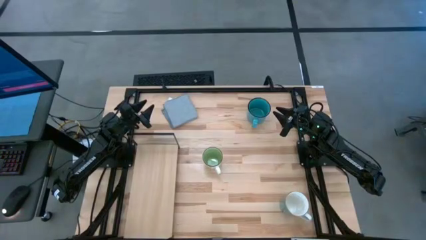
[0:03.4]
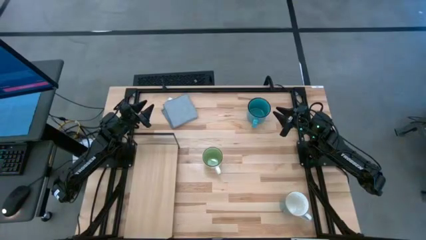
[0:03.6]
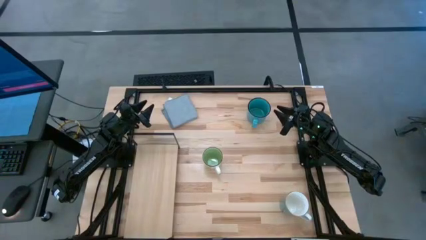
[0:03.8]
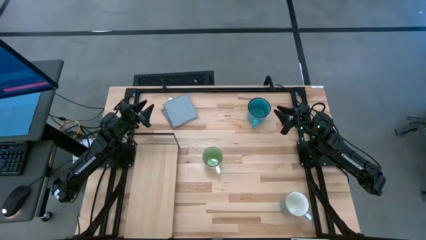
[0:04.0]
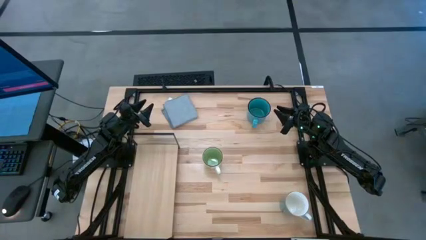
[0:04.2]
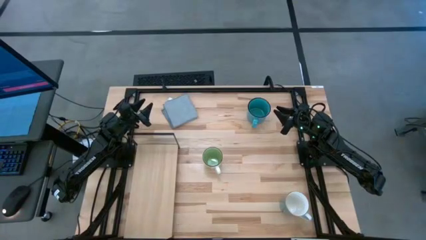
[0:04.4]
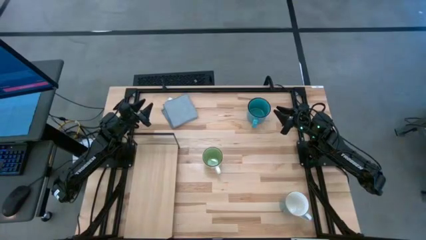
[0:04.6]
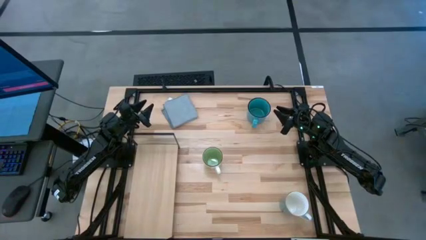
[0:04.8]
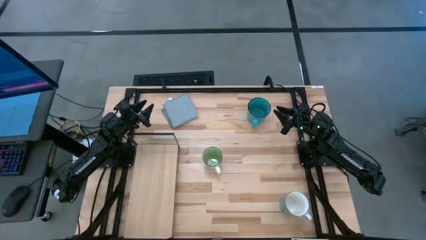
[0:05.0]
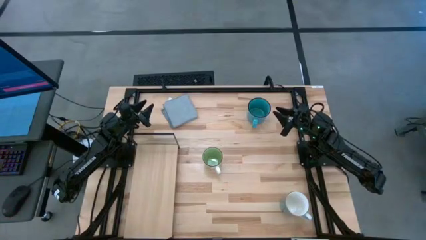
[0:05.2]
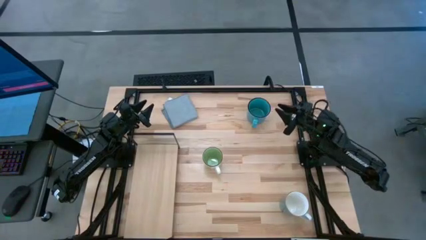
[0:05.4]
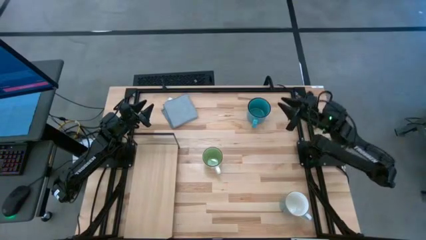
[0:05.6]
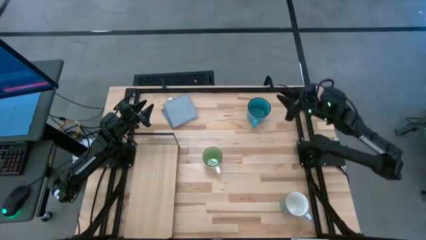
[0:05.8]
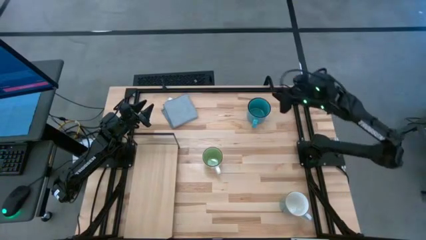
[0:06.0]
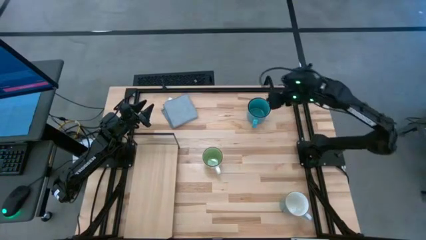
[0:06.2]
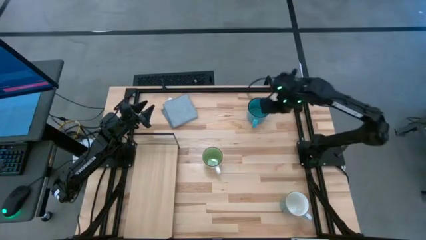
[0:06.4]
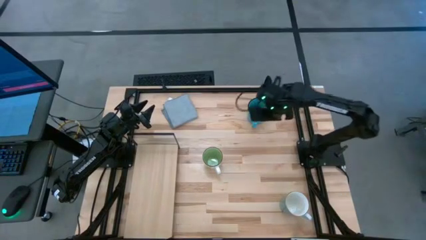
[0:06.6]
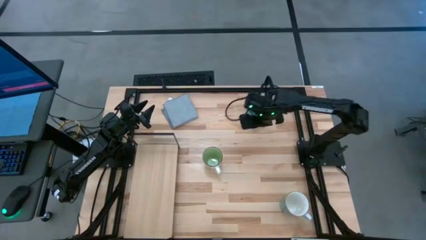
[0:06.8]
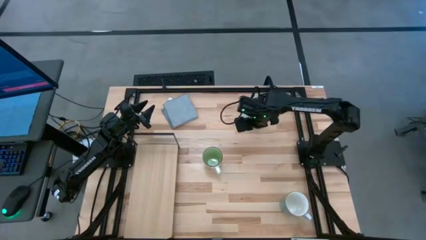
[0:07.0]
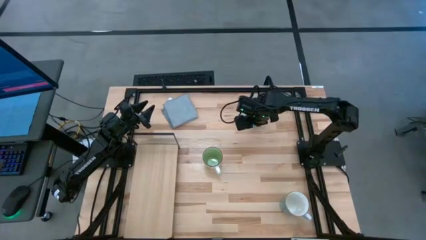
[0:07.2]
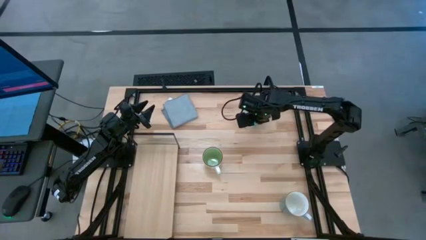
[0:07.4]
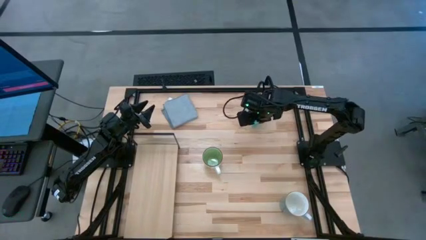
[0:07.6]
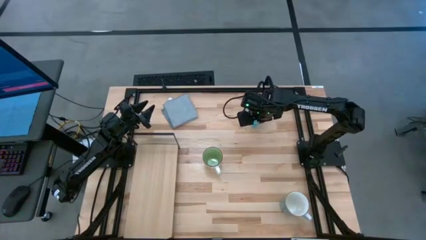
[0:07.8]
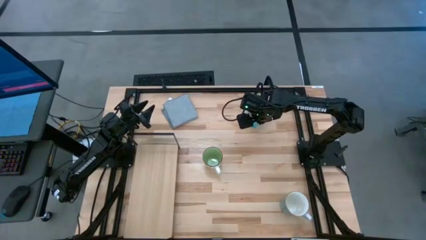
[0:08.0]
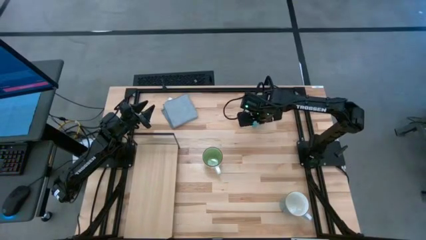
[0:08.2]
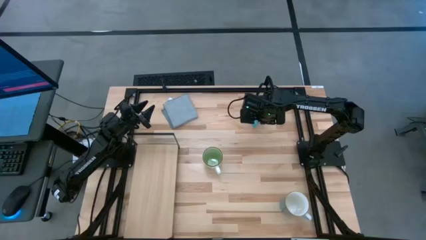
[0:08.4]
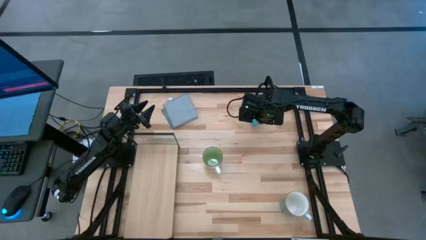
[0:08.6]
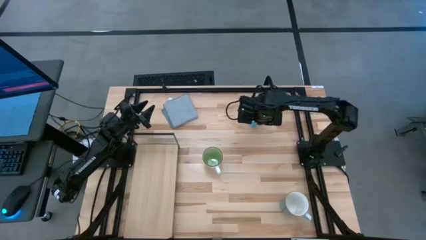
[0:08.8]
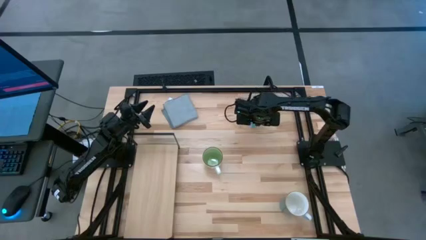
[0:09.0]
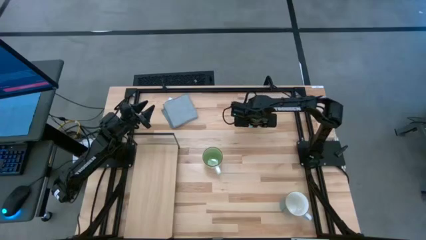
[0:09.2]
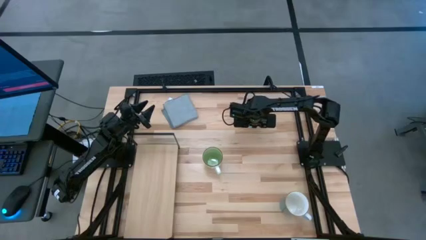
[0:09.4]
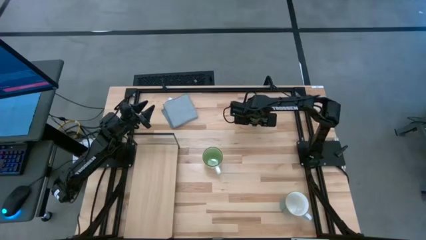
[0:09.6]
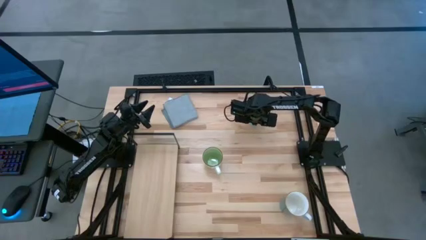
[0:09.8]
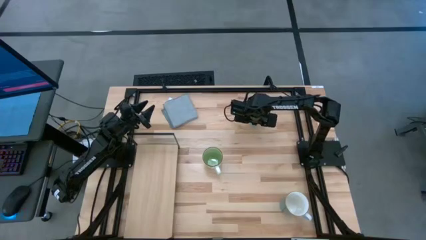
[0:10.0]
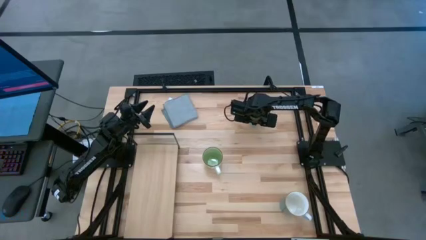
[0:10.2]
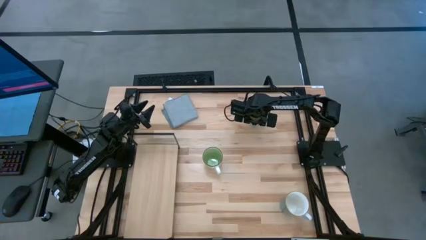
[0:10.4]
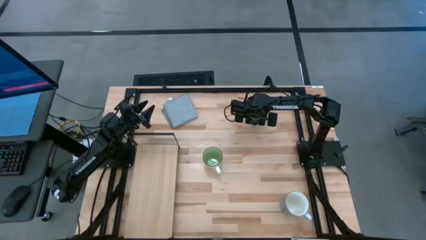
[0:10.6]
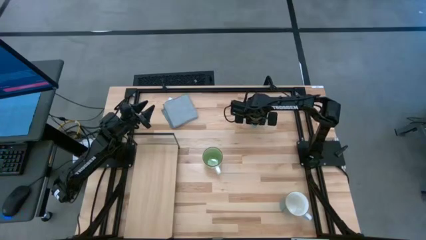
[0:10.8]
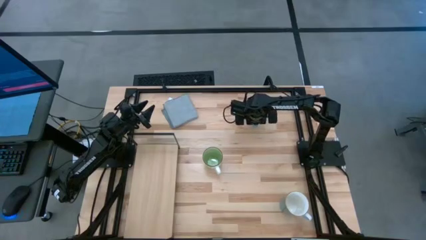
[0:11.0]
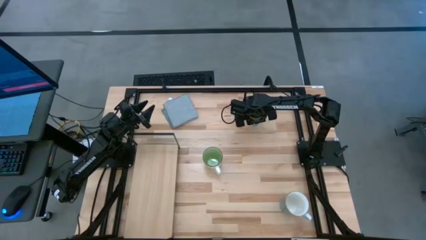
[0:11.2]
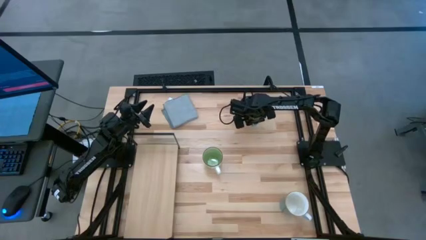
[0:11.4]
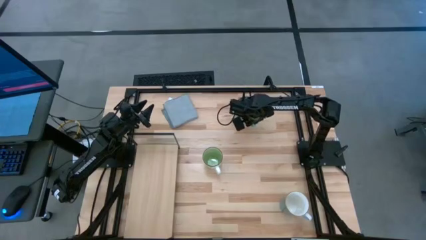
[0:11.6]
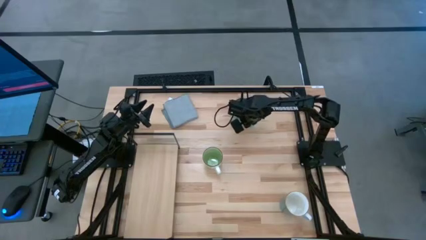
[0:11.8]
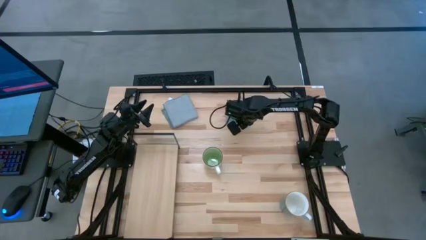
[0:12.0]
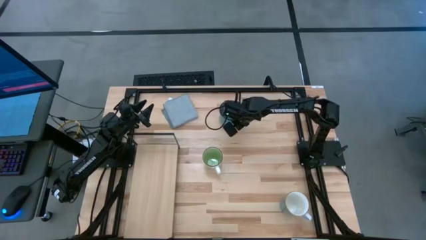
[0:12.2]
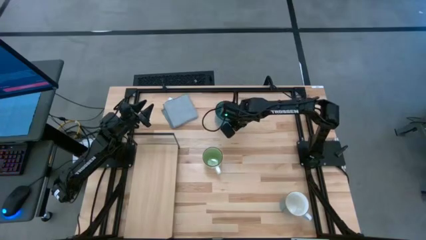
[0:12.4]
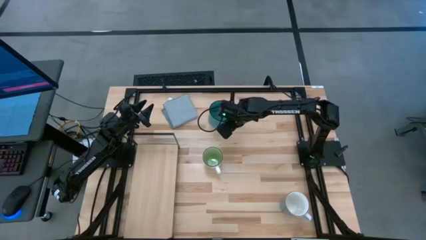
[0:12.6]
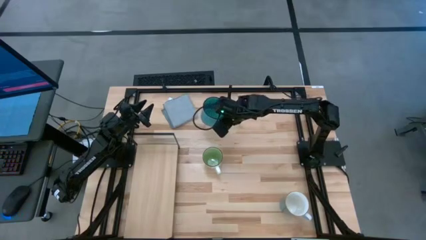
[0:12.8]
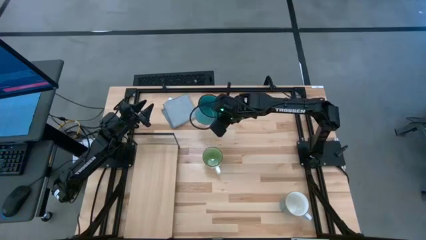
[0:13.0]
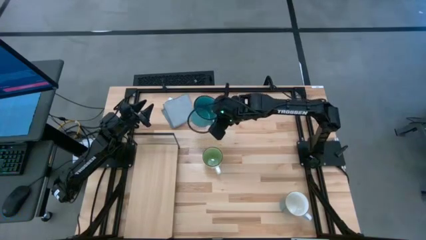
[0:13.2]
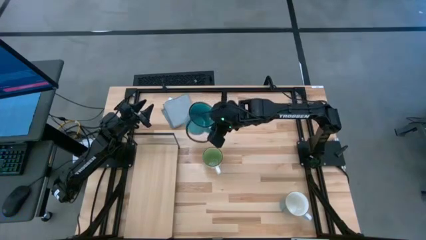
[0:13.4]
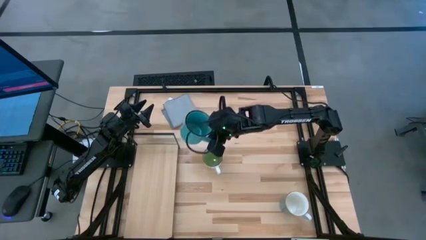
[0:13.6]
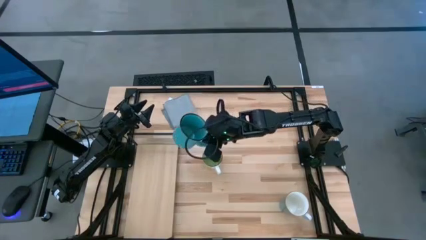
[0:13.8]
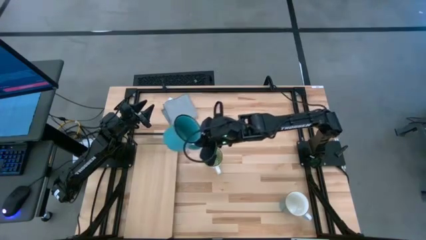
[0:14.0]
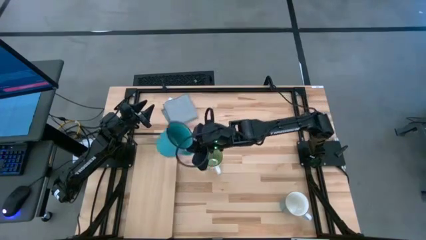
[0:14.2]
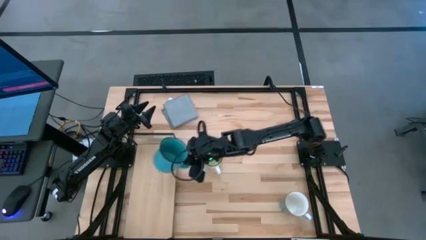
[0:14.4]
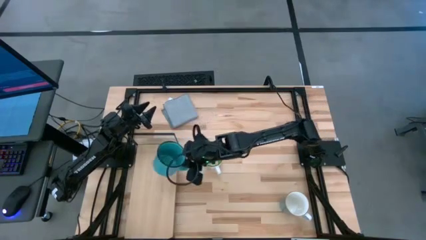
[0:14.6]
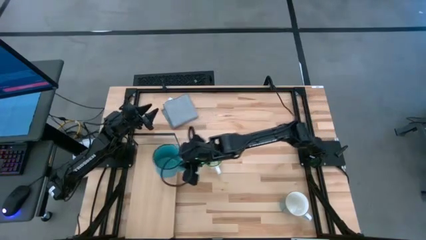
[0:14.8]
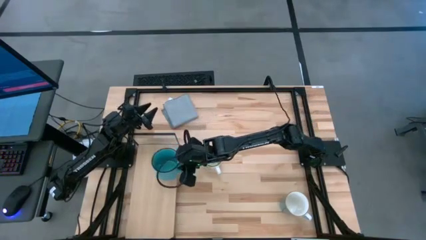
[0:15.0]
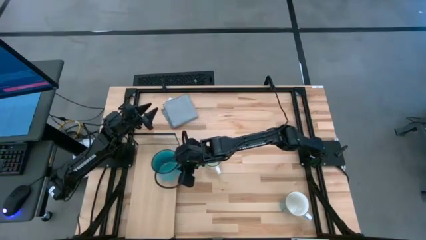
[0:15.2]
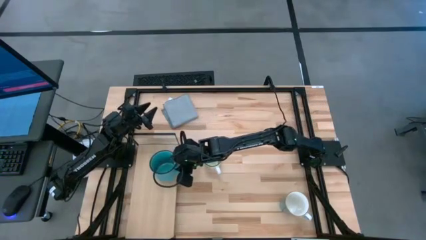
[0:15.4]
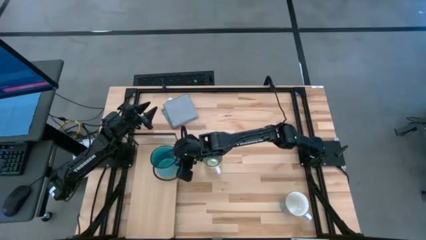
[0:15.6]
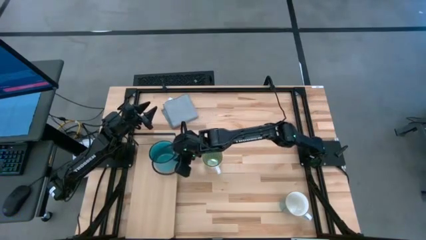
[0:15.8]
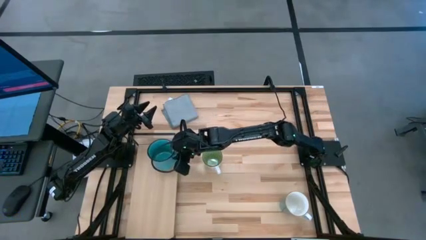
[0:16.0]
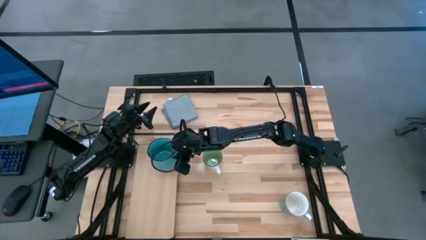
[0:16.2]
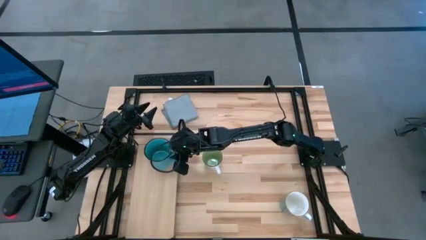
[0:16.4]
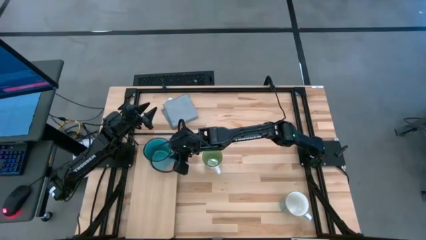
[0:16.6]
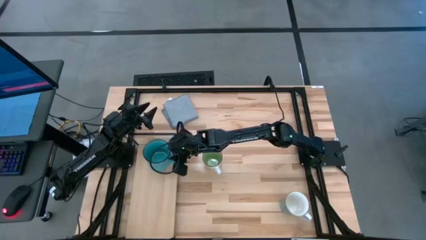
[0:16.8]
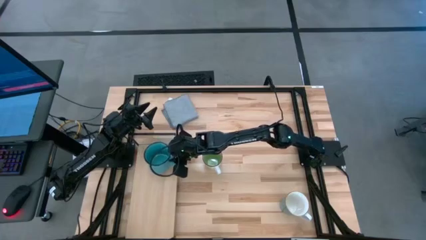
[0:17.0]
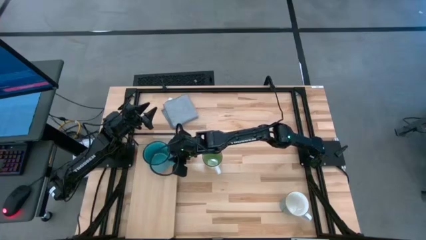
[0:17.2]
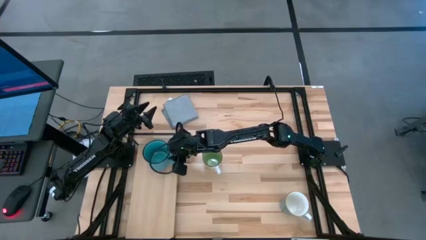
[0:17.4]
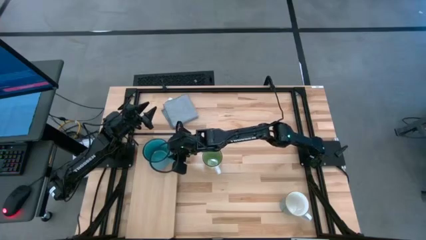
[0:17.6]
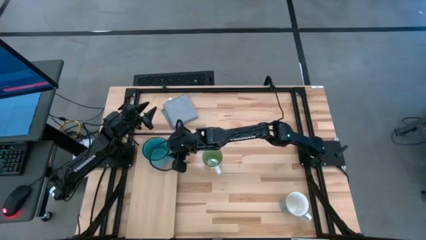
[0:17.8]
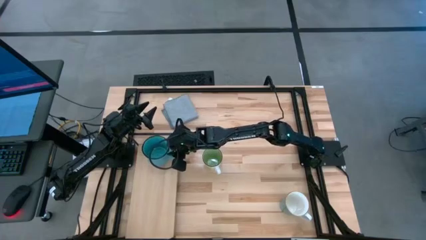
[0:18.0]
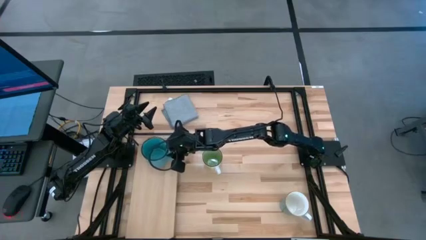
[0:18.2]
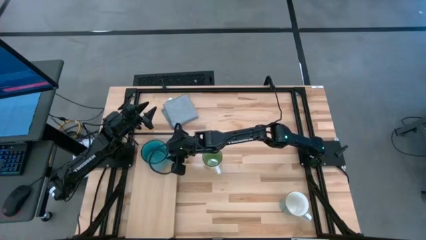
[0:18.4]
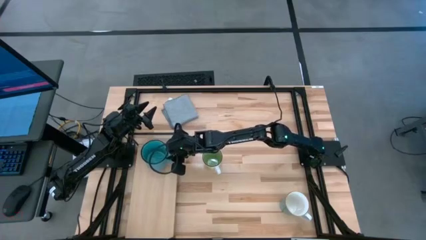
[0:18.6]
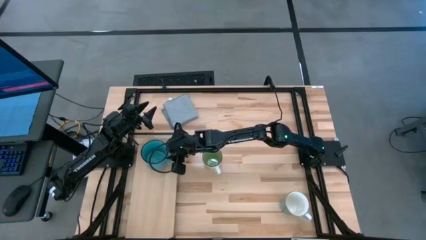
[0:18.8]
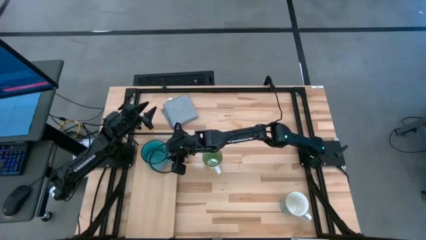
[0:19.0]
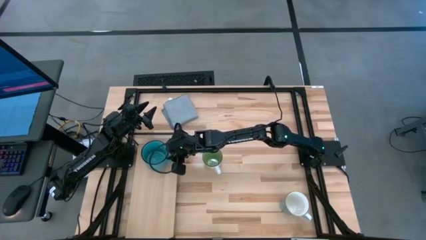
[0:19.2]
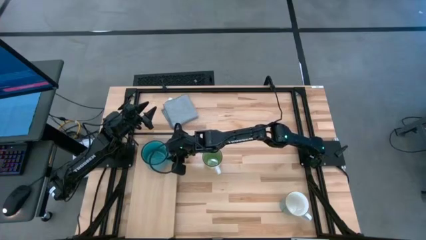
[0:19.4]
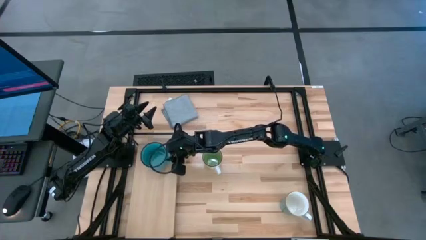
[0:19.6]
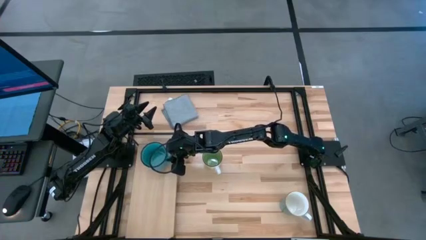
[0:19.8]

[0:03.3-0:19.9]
Task: Stack small to large cups/mugs on shelf
Put the top blue mug on the shelf
